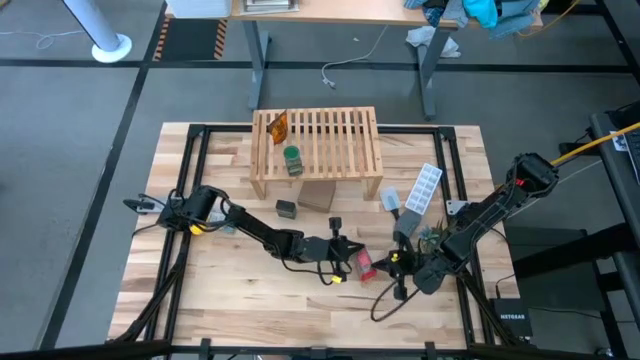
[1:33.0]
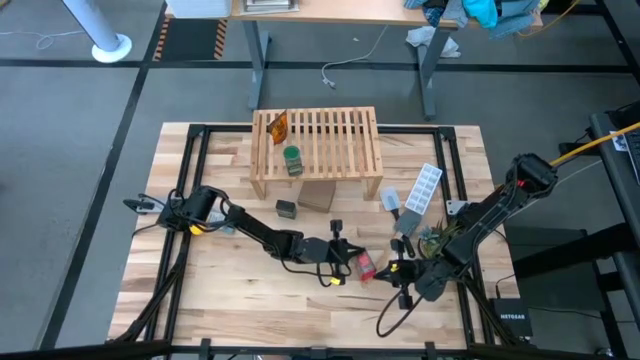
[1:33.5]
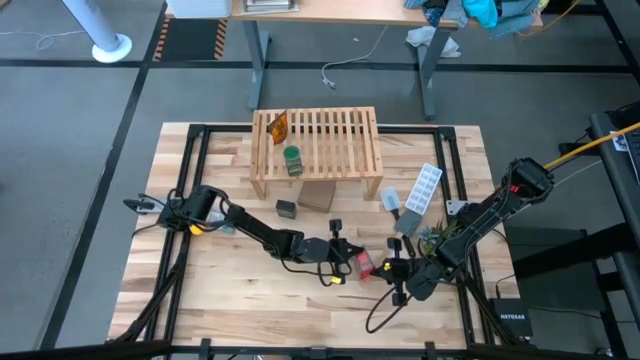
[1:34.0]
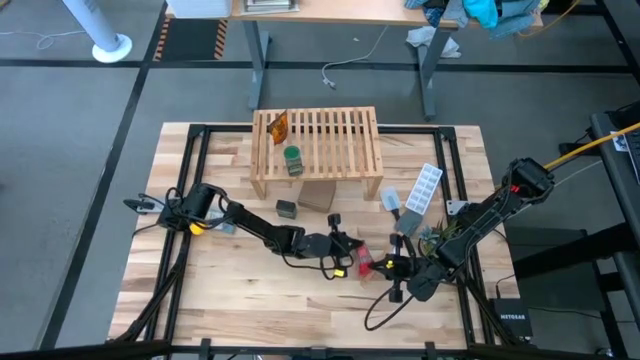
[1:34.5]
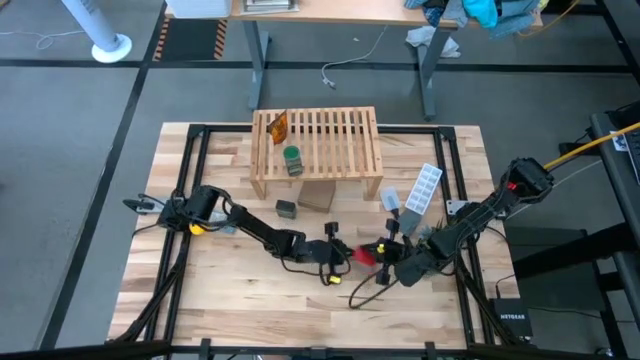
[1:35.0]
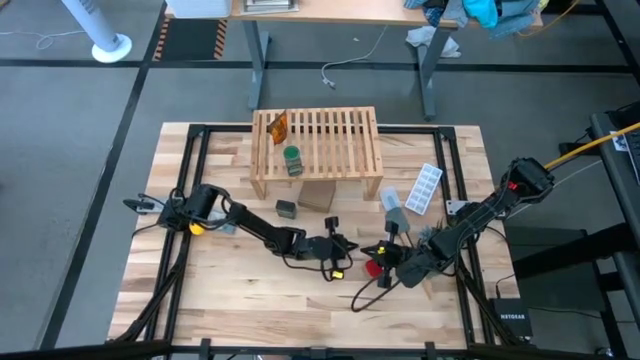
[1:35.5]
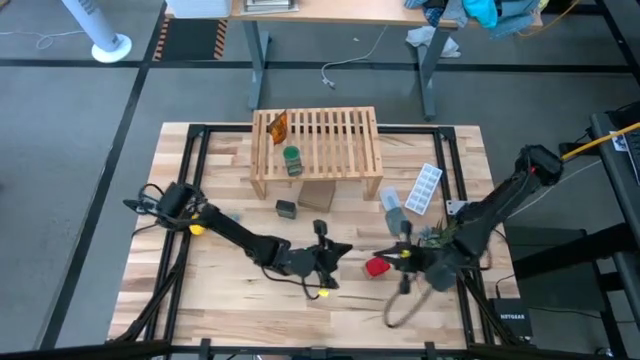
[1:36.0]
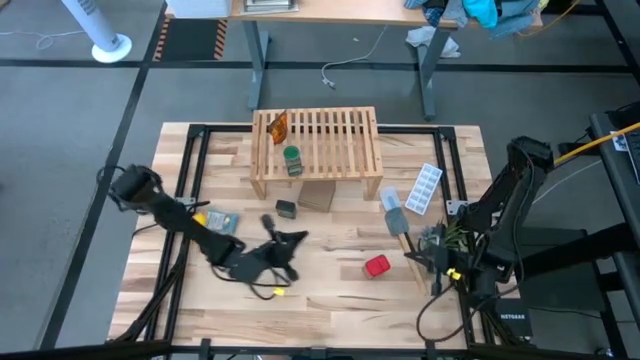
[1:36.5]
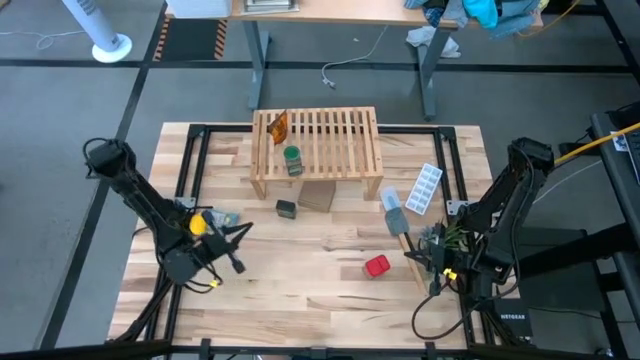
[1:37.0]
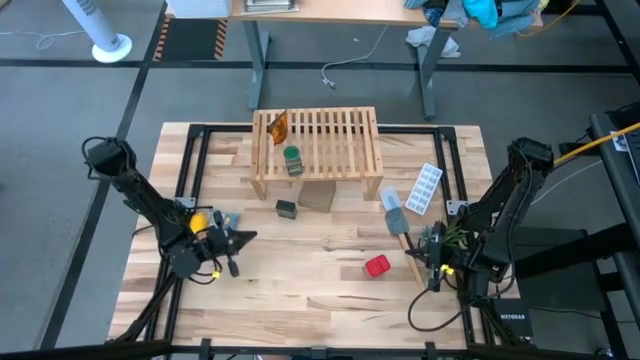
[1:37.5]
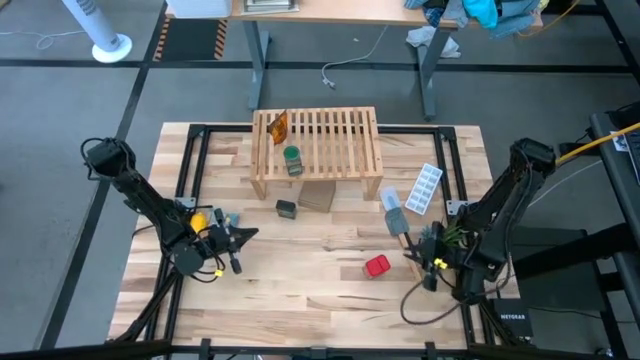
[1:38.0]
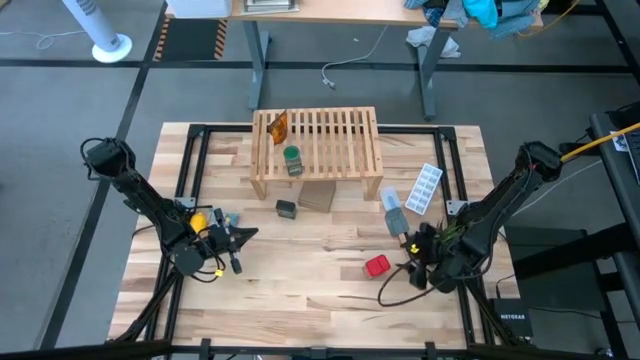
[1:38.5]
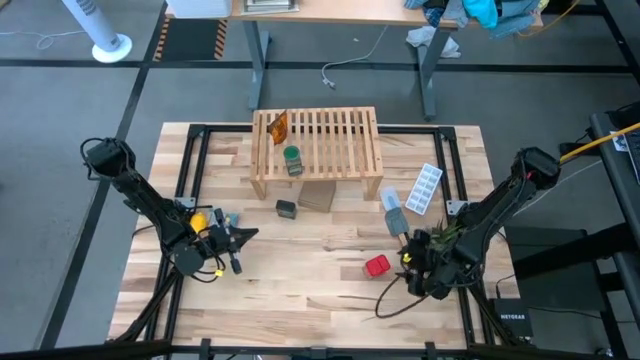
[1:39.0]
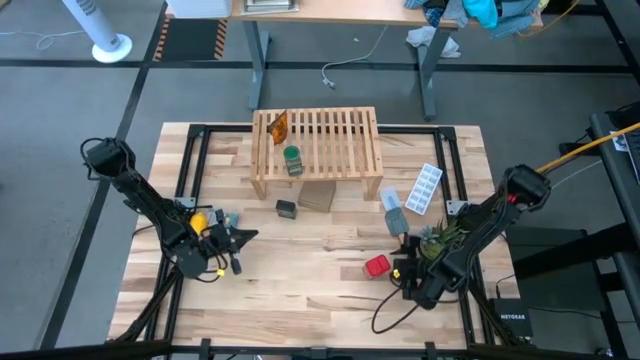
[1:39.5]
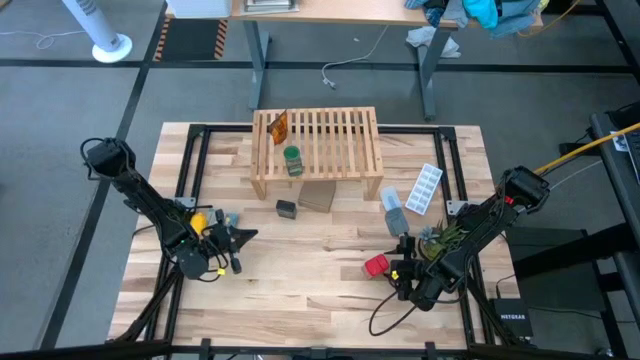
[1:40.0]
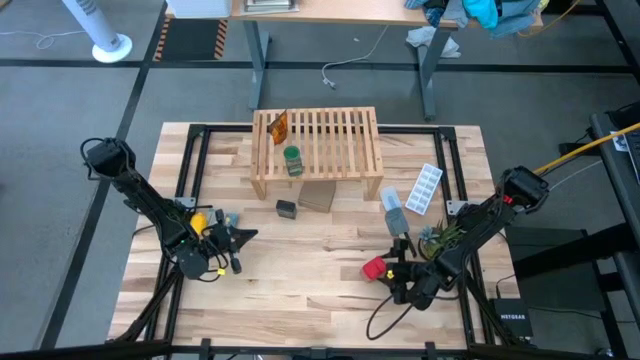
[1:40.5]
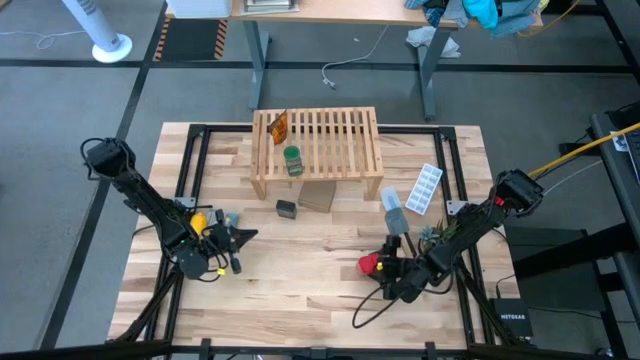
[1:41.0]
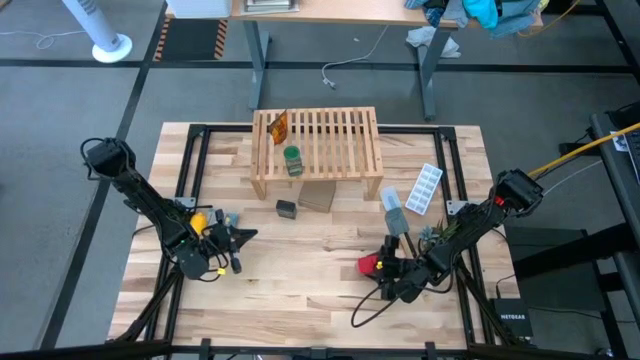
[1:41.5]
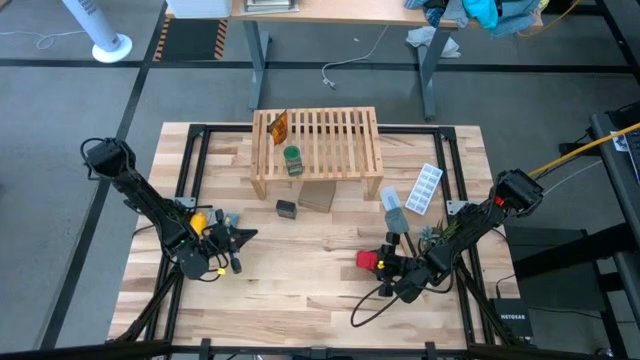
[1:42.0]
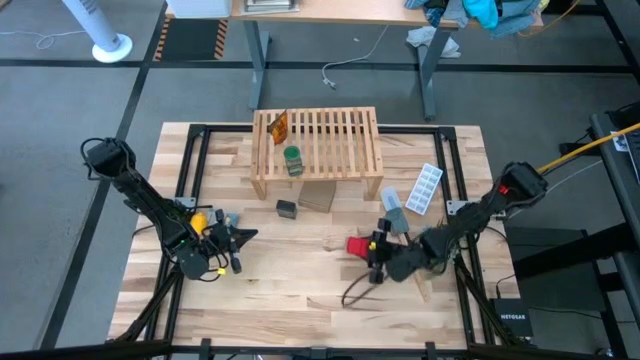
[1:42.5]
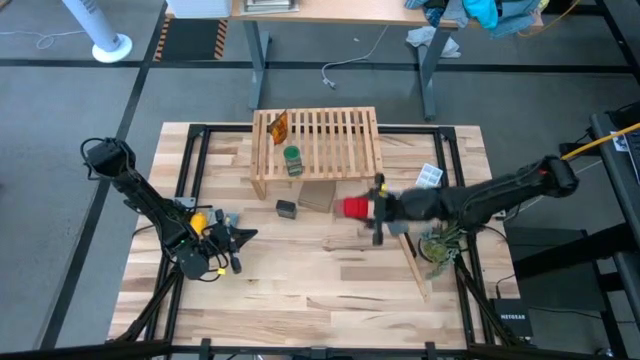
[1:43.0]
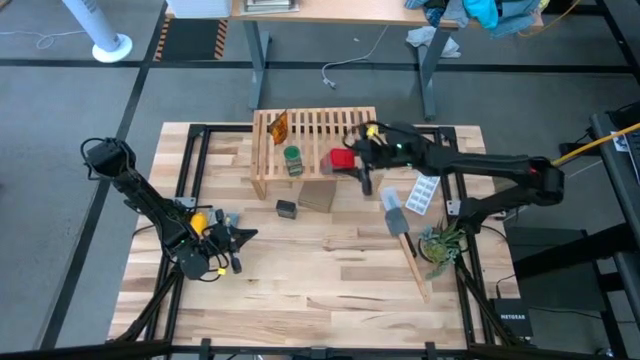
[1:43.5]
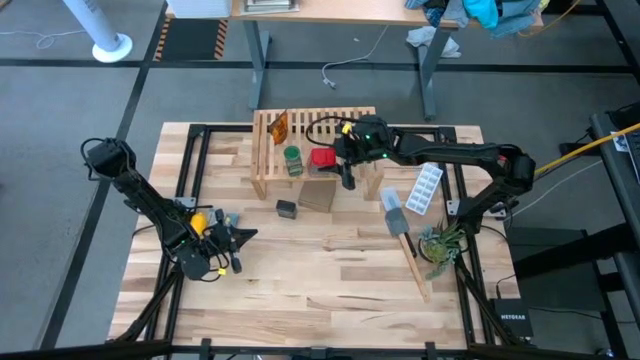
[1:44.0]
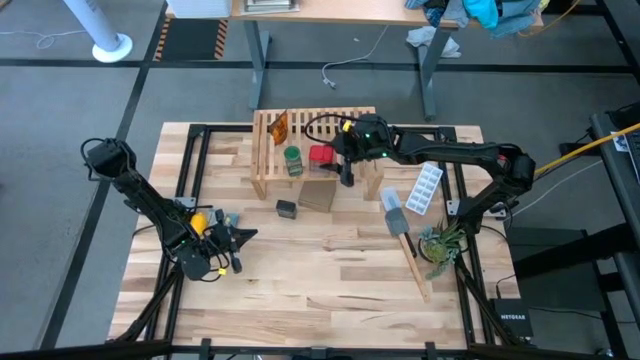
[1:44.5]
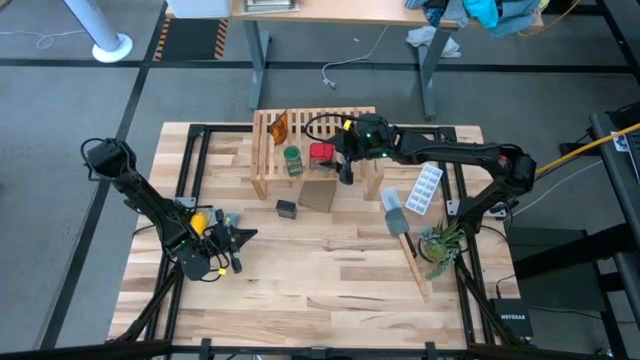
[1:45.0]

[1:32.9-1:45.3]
Task: Shelf spices
Put the red seasoning can on the shelf

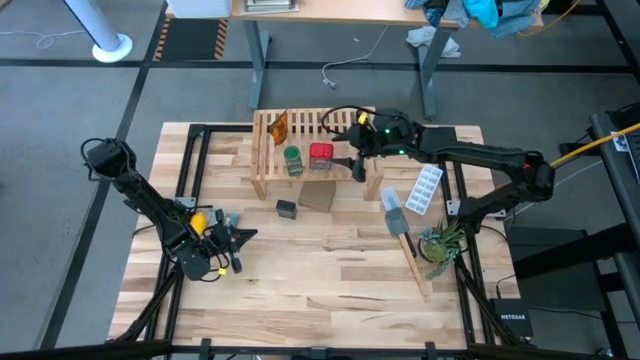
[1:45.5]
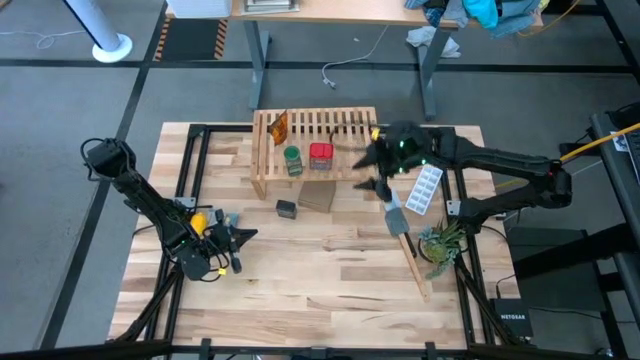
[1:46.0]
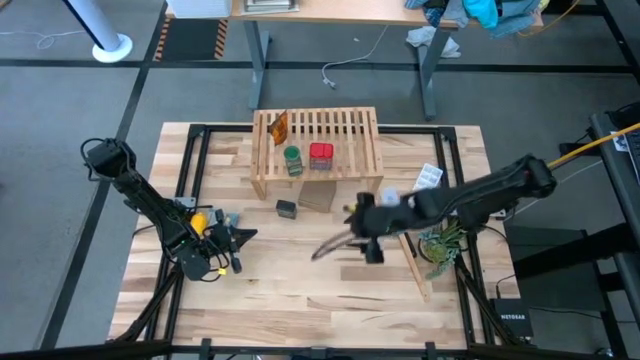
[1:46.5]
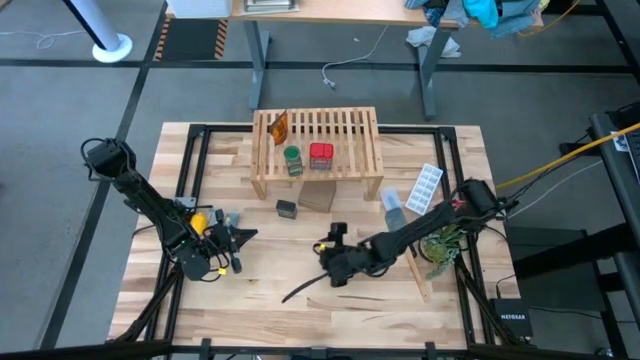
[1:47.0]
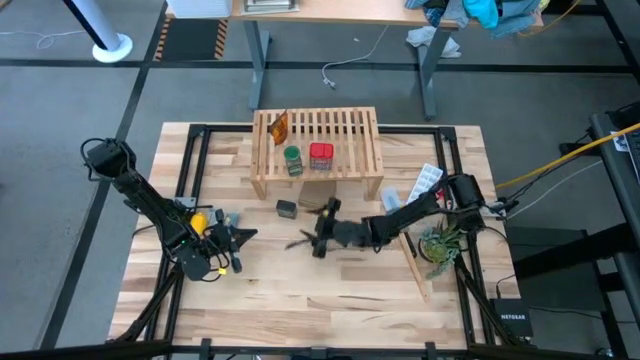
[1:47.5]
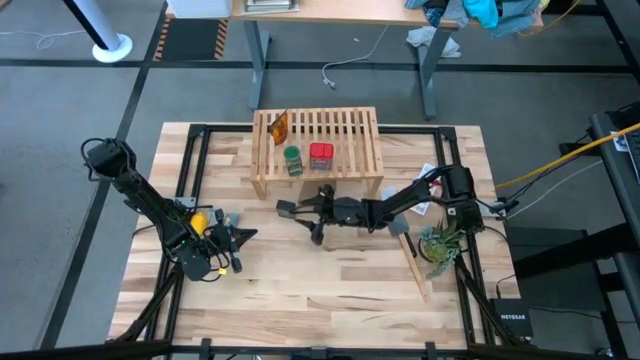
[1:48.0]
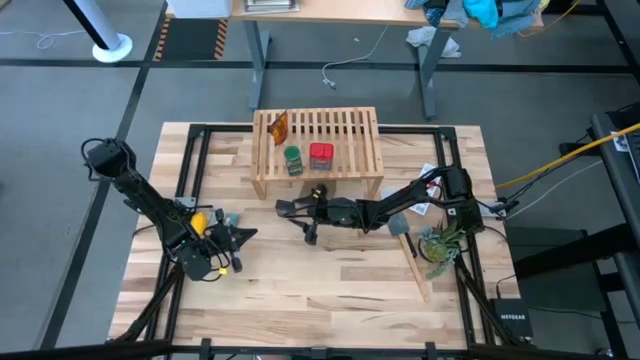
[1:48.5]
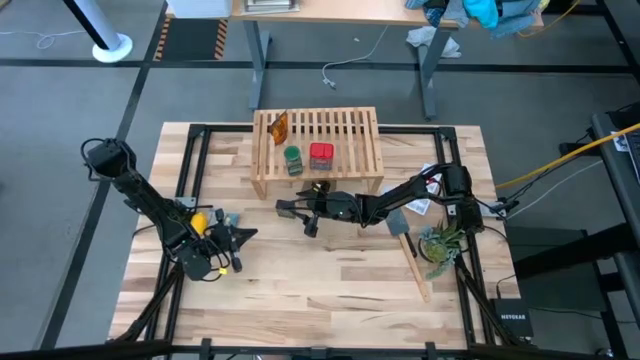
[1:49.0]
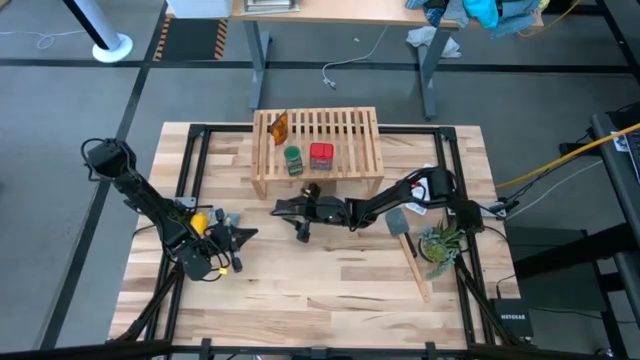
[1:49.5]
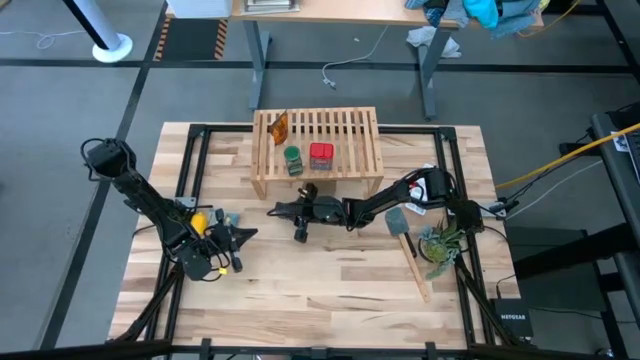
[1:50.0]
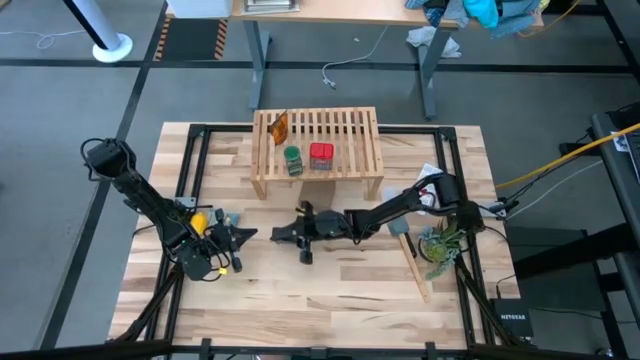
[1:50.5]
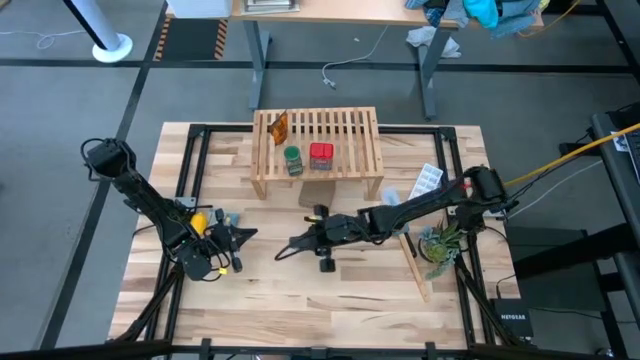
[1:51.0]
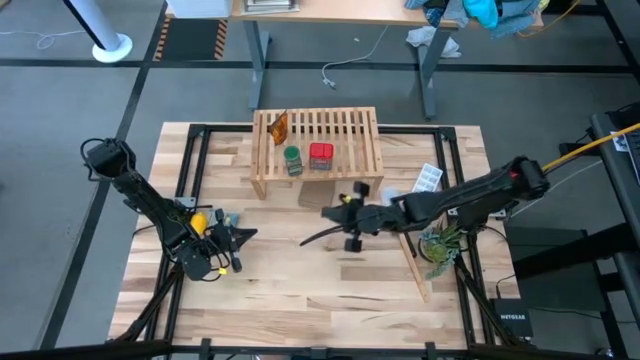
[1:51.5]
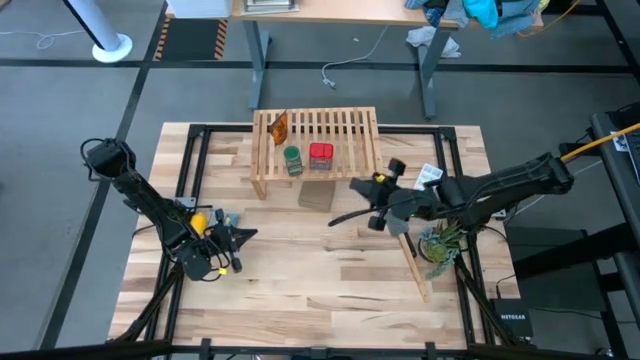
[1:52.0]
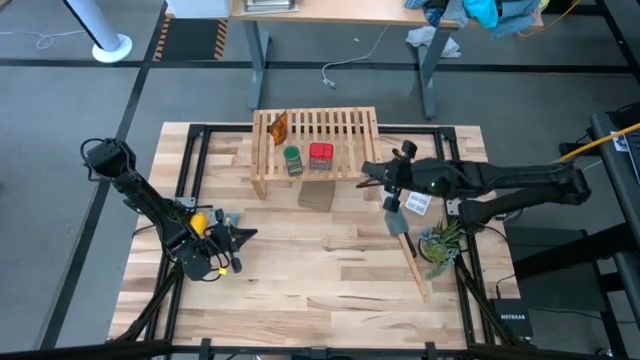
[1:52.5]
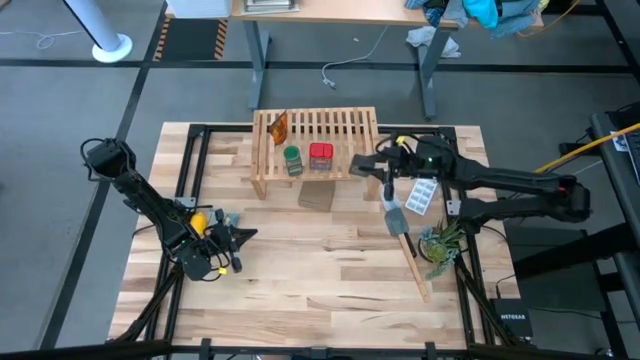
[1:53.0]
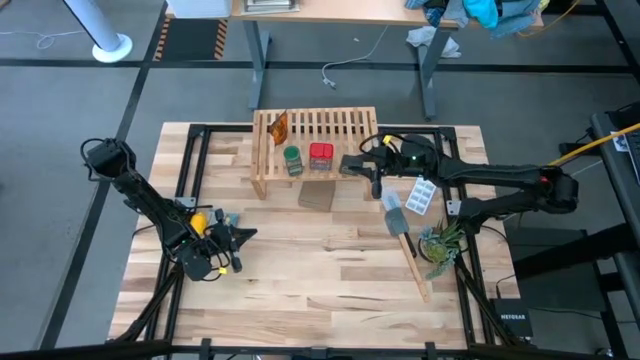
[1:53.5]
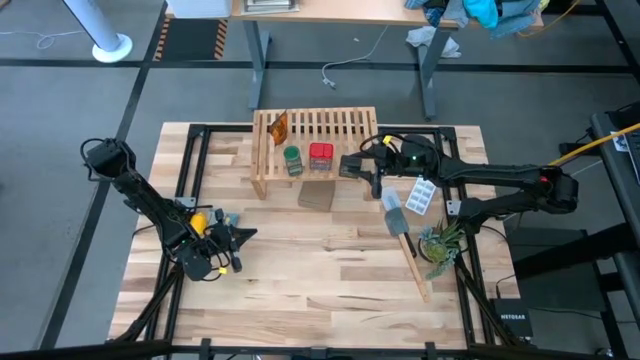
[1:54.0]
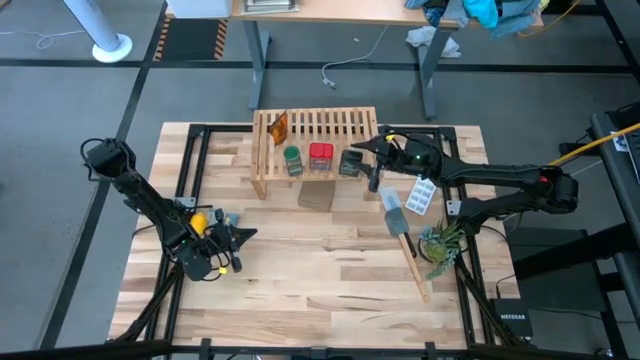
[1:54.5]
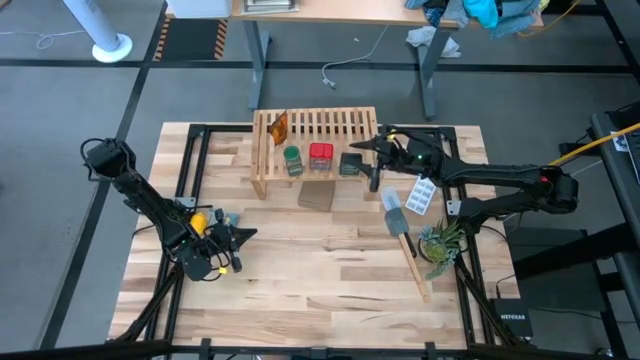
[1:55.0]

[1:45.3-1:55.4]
Put the black seasoning can on the shelf
